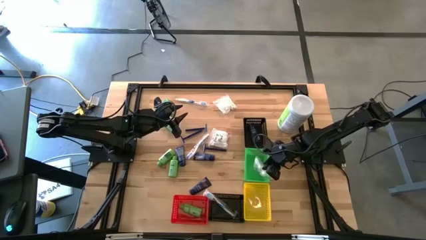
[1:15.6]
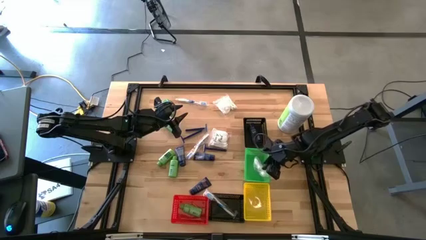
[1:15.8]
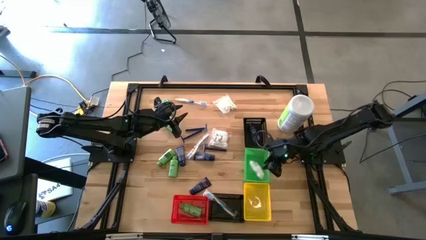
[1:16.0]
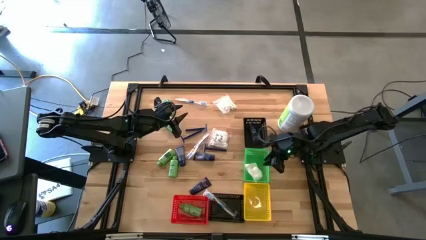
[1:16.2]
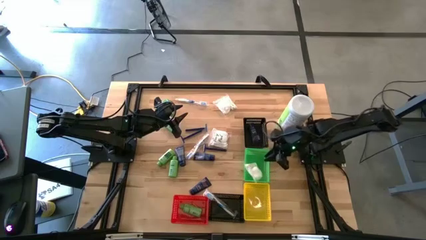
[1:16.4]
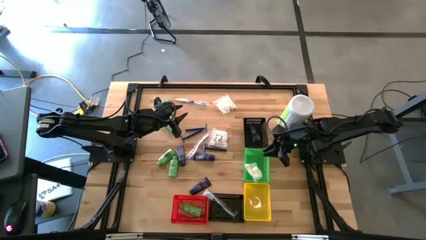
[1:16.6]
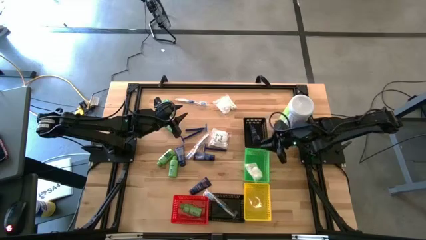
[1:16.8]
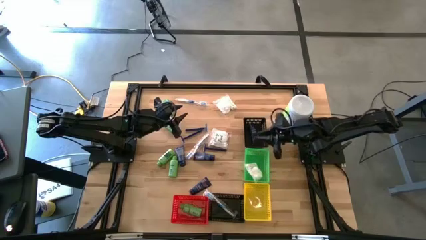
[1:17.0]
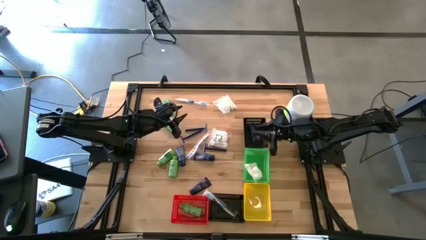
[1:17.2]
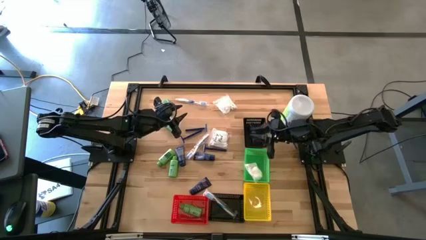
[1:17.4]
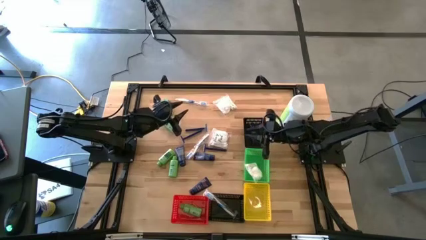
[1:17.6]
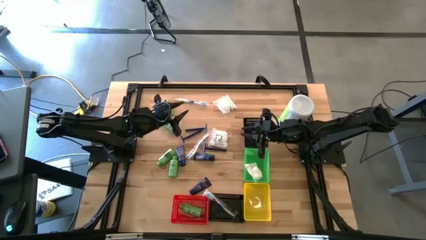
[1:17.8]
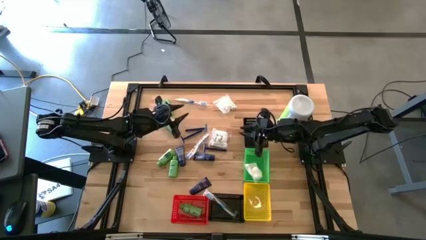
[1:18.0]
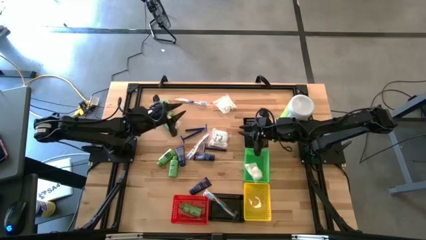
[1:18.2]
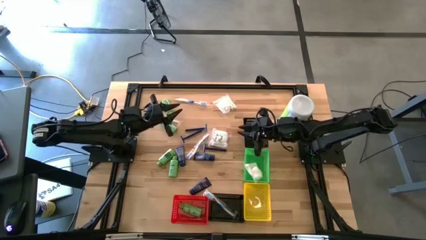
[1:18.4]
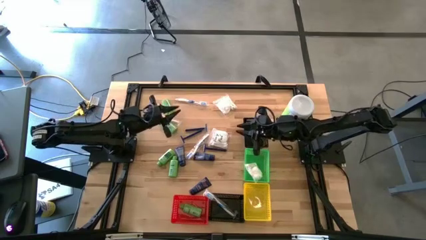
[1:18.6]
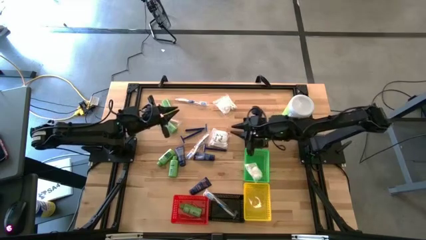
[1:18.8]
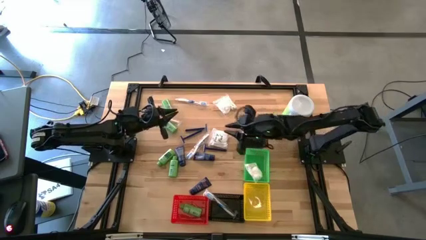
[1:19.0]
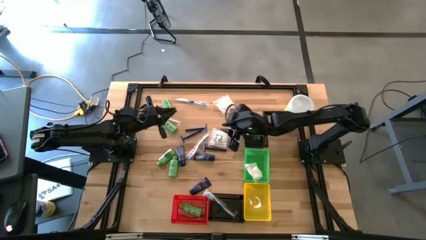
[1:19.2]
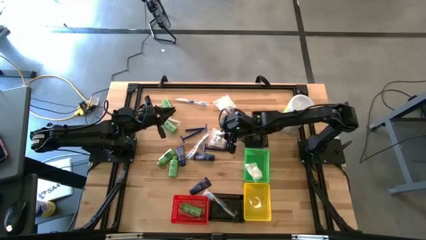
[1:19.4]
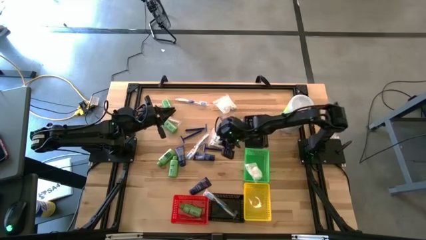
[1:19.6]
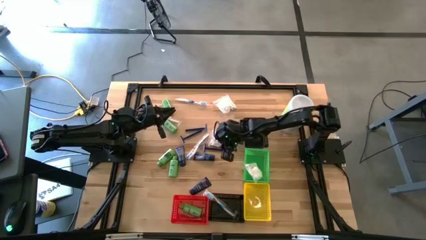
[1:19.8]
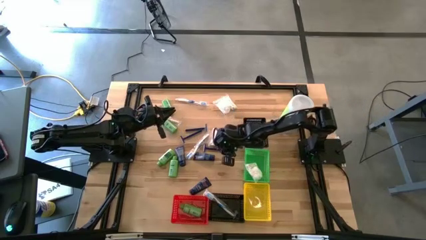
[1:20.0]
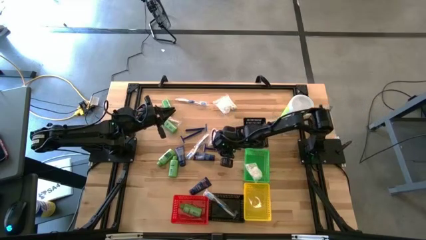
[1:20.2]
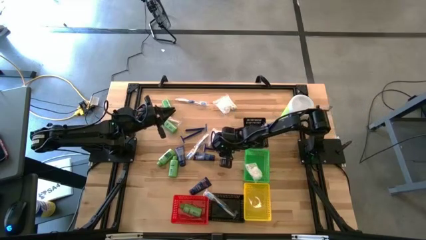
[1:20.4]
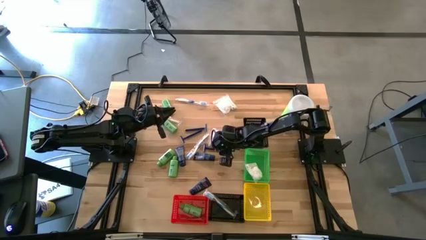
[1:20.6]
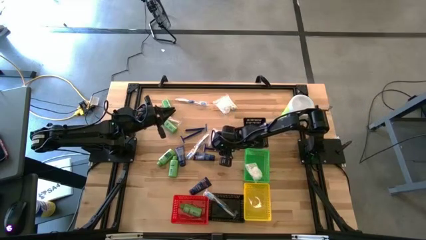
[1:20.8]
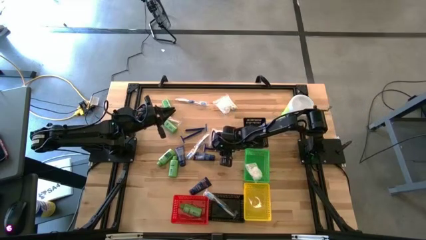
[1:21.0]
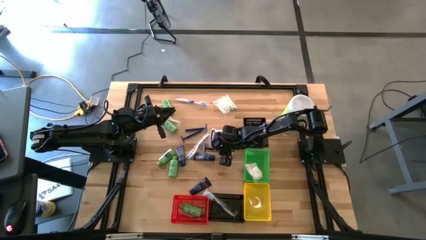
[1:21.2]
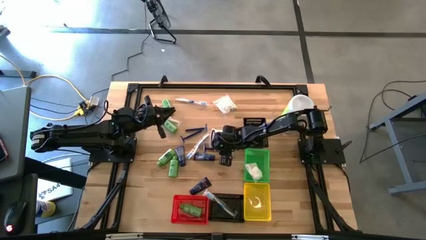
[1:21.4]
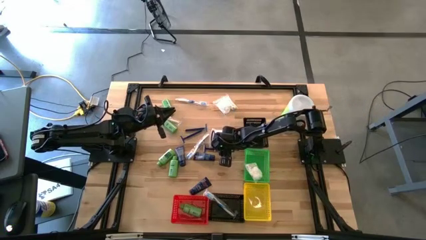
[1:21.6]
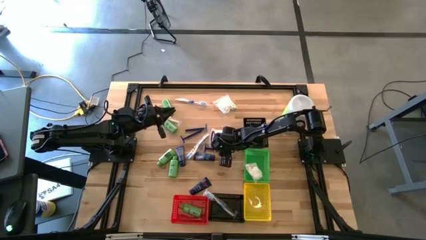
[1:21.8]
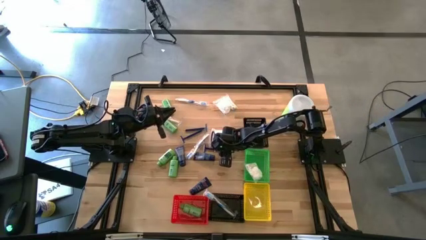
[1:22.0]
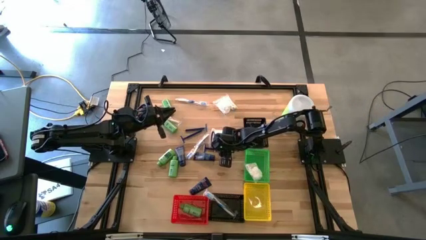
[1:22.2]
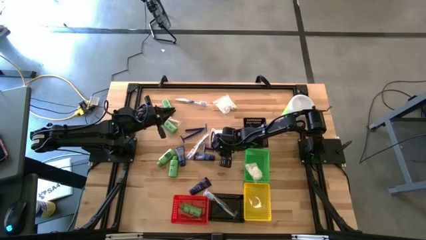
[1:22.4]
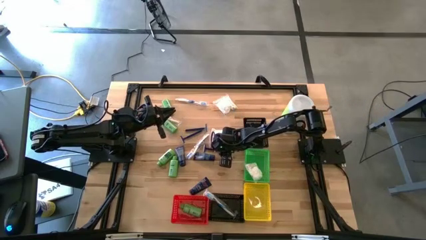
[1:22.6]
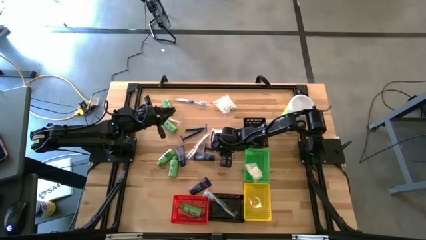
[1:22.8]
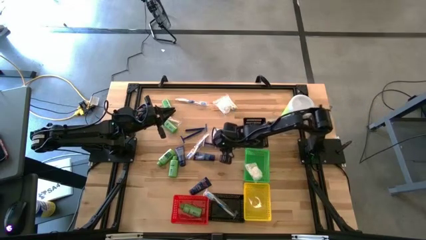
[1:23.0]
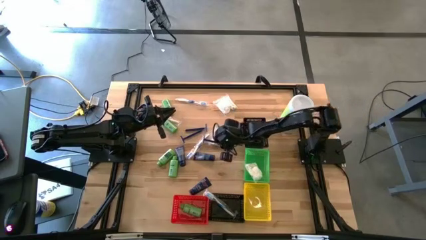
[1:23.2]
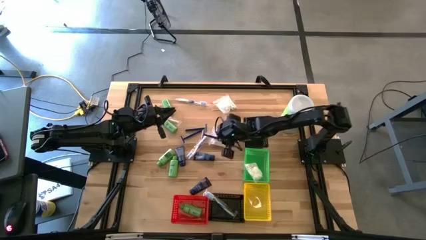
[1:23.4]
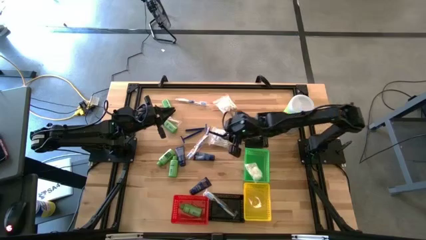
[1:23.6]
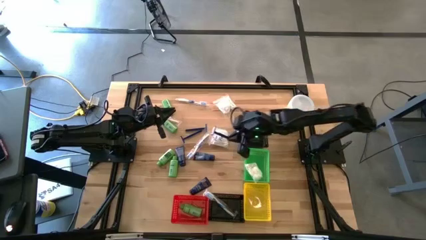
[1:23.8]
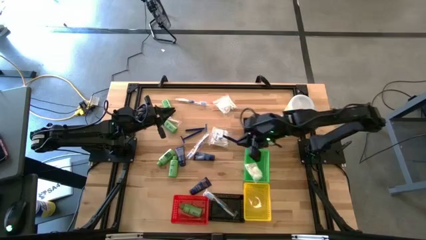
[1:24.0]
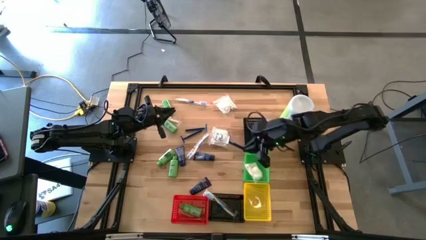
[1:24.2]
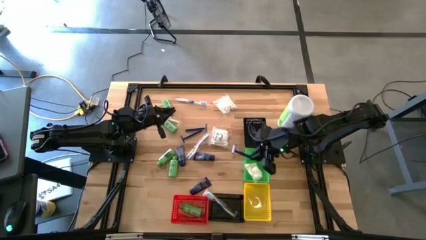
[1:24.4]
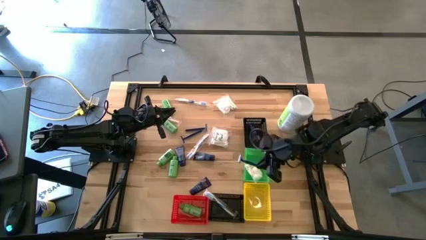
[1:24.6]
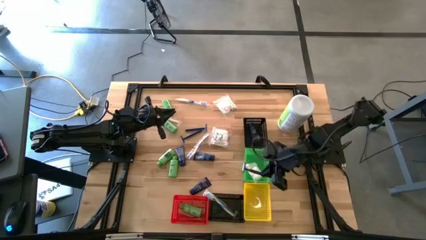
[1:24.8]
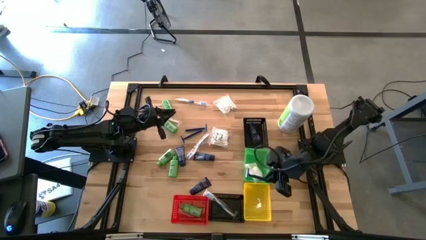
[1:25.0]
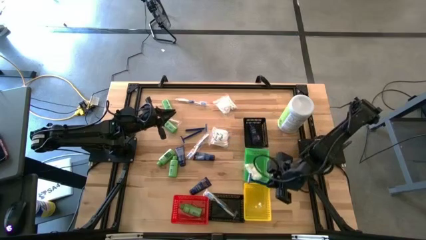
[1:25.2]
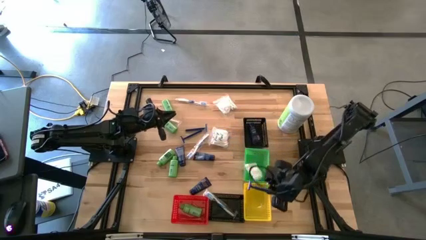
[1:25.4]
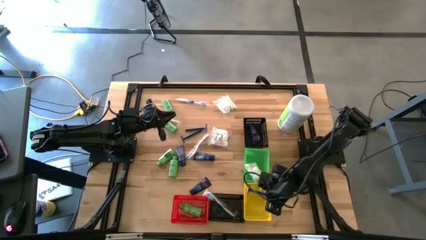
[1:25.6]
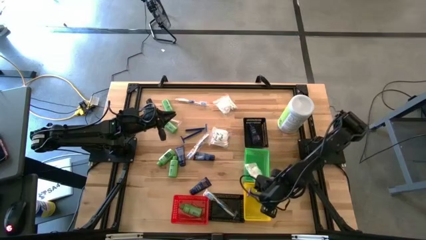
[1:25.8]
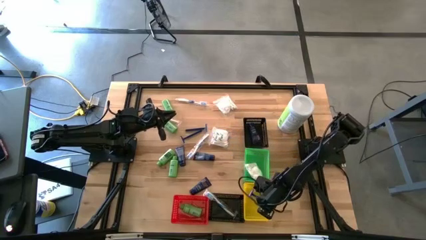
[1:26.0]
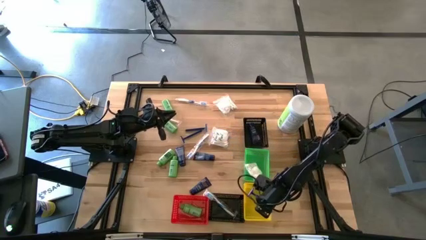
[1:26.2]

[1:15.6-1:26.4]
Task: Pick & Place Travel size toiletries
Put the bottom blue razor into the yellow bin

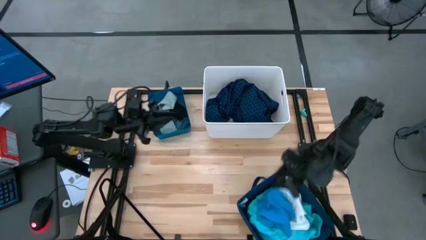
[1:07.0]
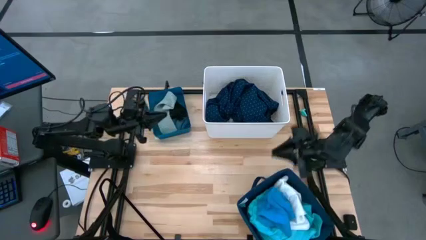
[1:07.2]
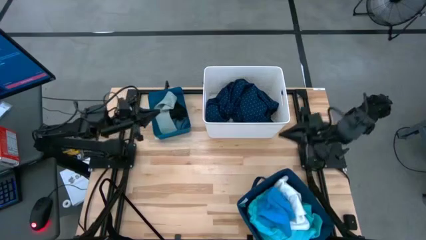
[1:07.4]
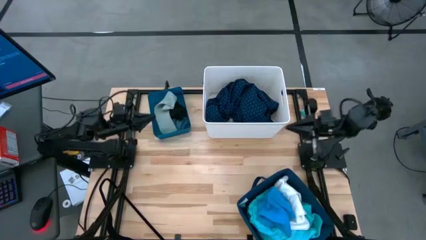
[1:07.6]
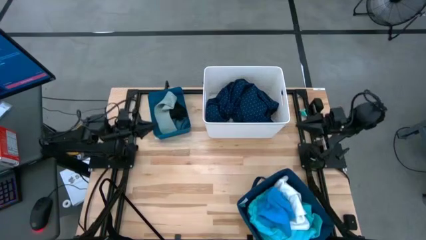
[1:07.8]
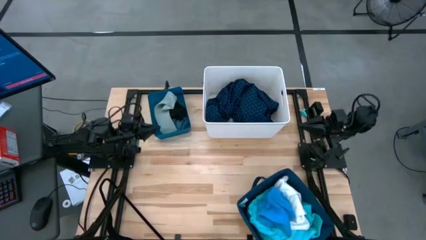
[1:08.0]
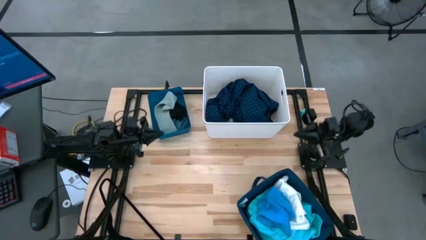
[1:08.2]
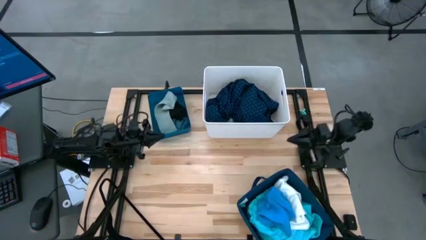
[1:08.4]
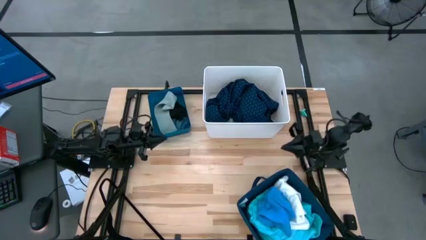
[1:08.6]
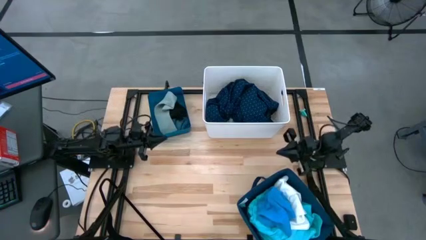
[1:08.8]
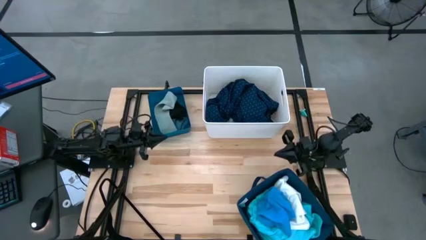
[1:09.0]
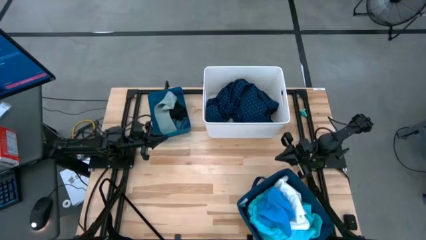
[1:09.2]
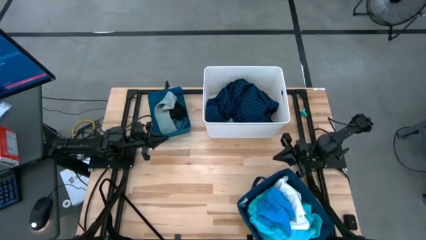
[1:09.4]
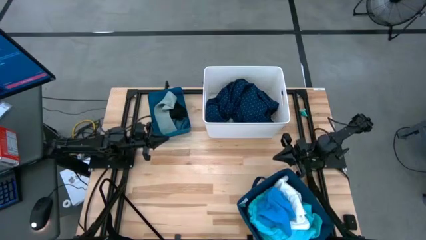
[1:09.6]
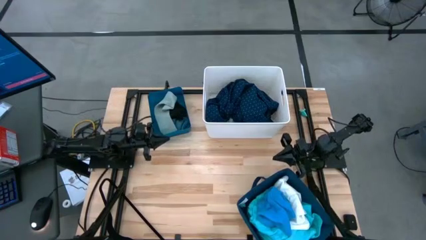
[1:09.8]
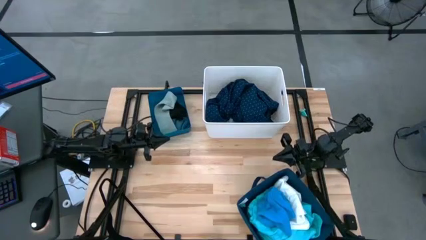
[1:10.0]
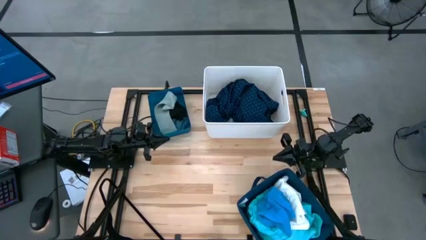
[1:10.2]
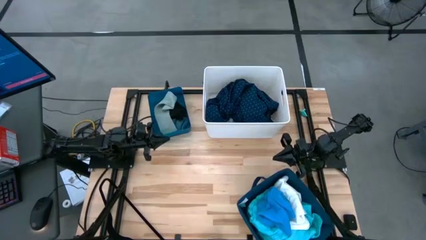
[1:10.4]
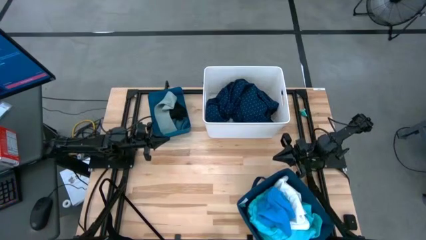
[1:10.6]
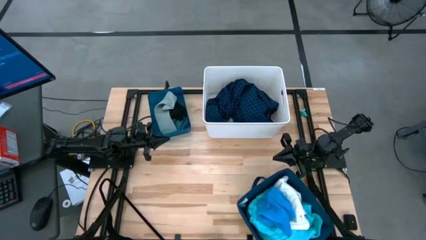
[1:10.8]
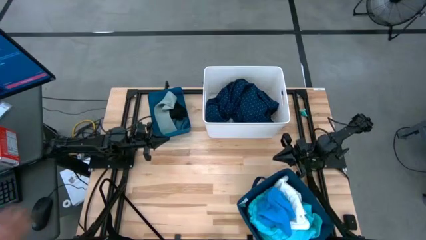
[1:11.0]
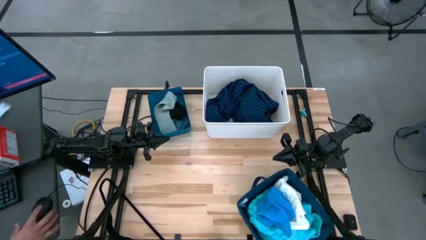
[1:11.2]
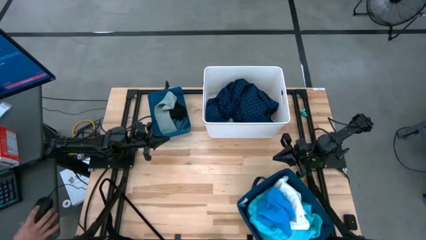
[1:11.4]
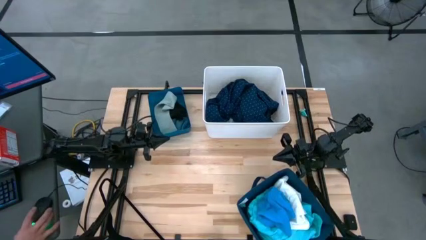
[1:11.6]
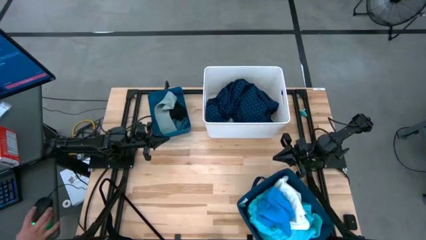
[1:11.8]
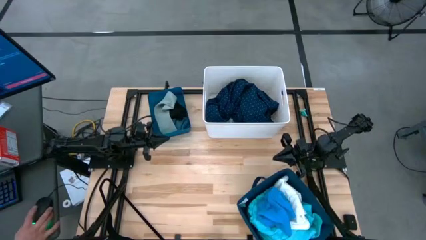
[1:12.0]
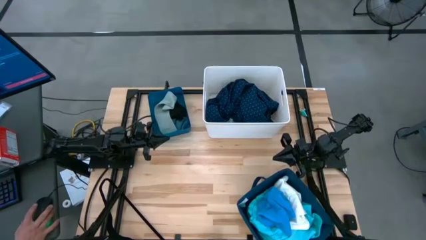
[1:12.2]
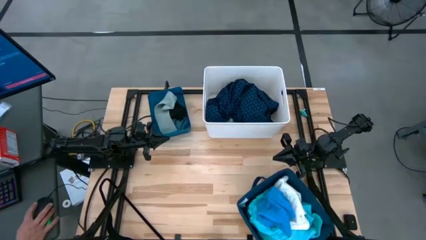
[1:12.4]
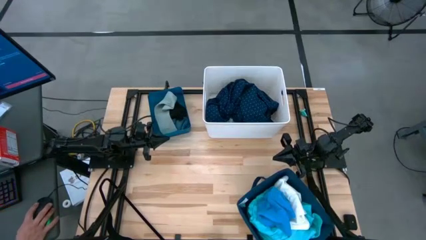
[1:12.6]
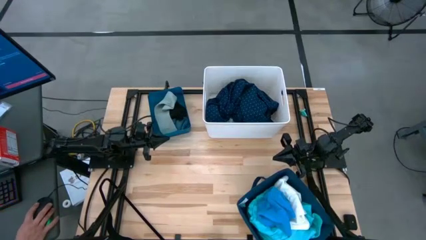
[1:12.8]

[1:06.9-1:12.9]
Task: Pick & Place Cloths
Return to Home Position
